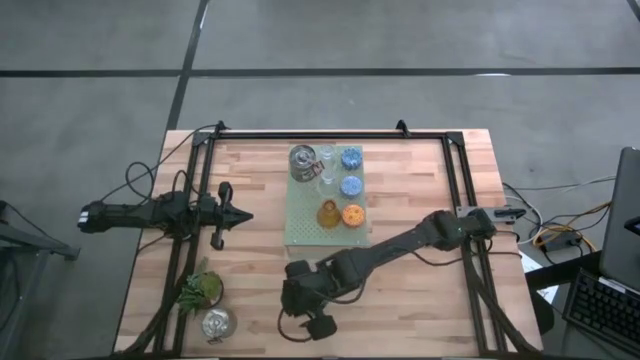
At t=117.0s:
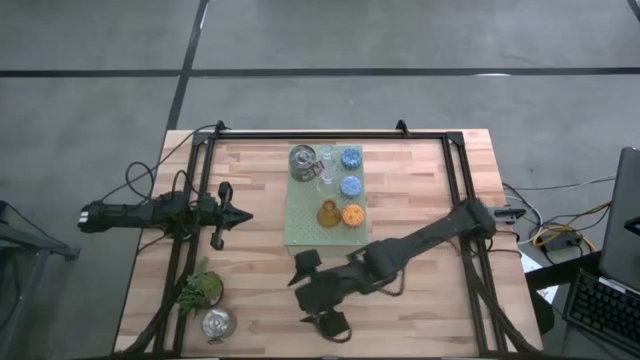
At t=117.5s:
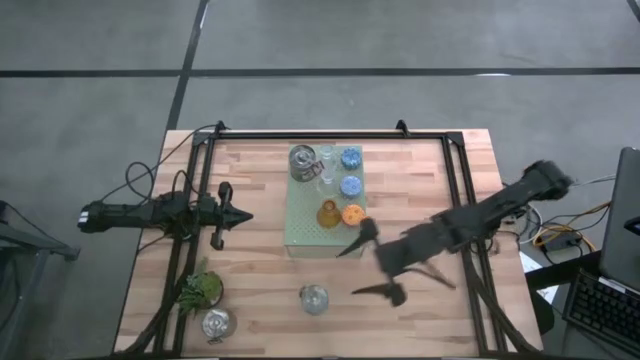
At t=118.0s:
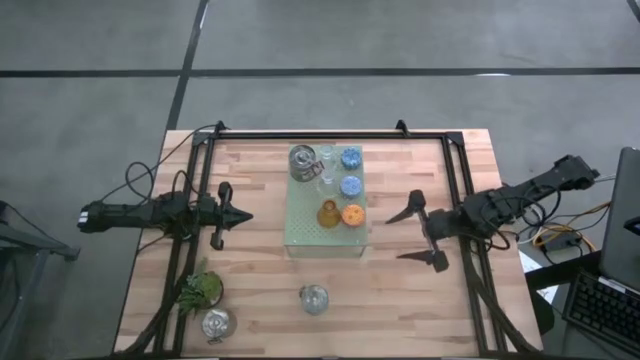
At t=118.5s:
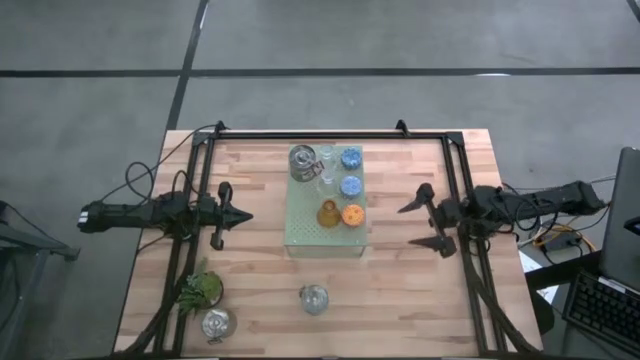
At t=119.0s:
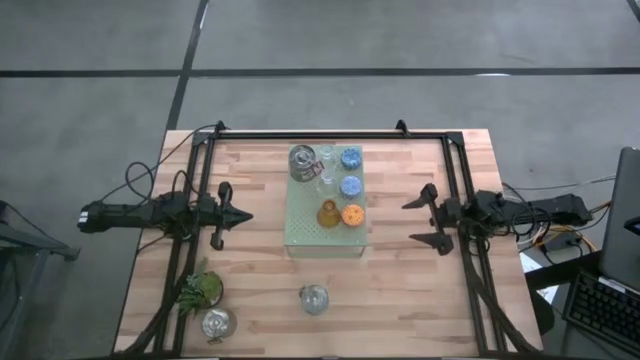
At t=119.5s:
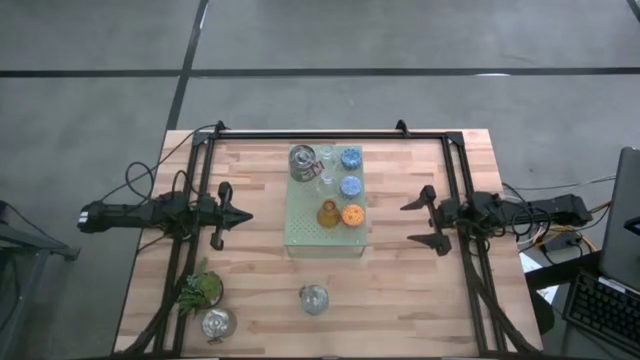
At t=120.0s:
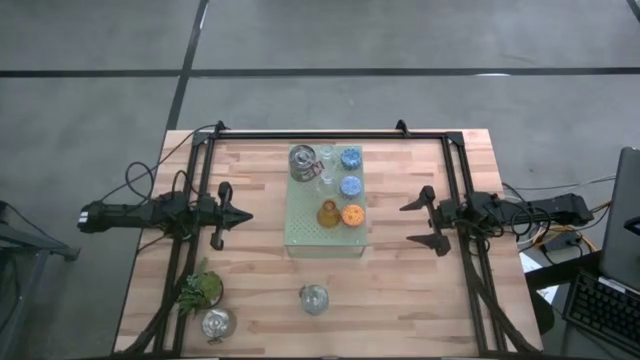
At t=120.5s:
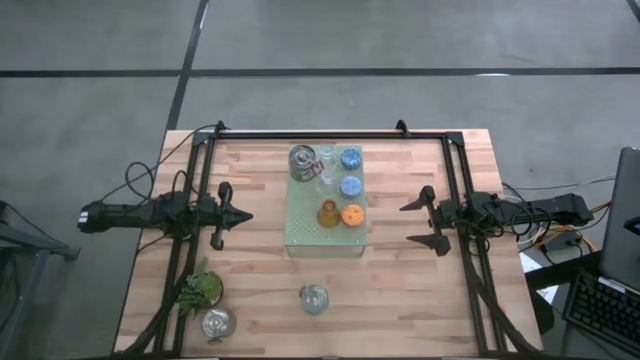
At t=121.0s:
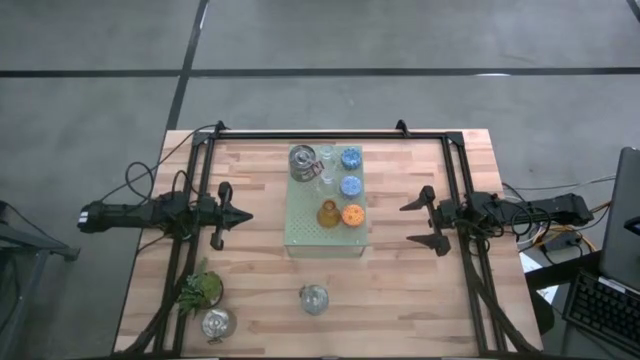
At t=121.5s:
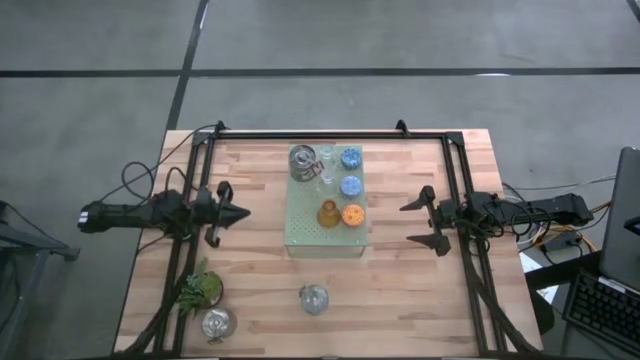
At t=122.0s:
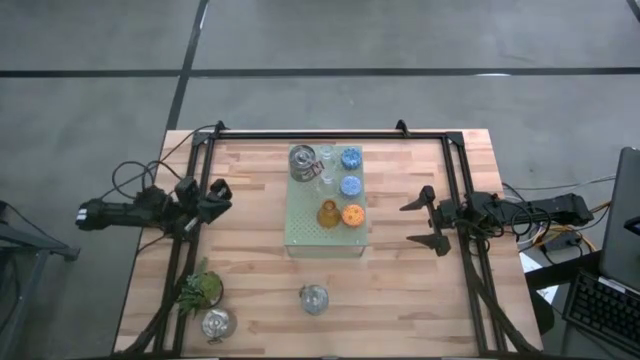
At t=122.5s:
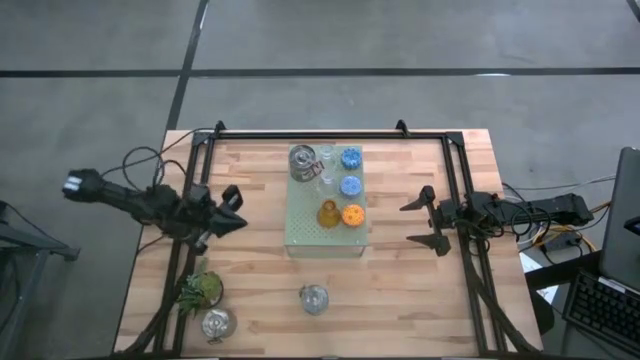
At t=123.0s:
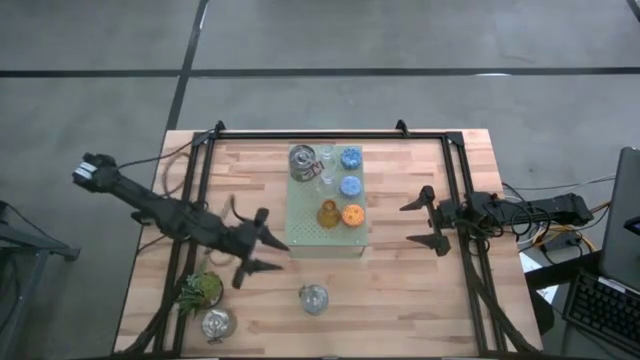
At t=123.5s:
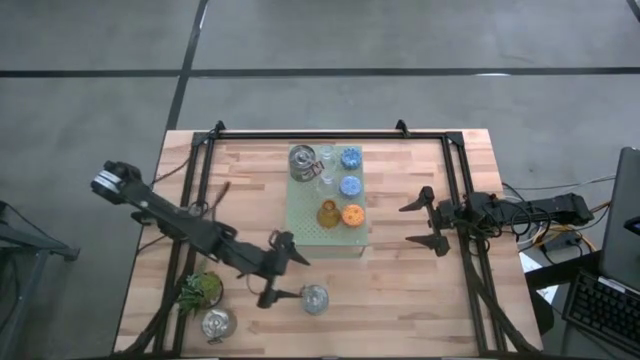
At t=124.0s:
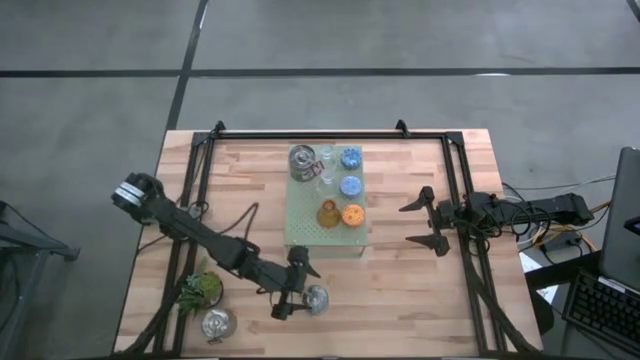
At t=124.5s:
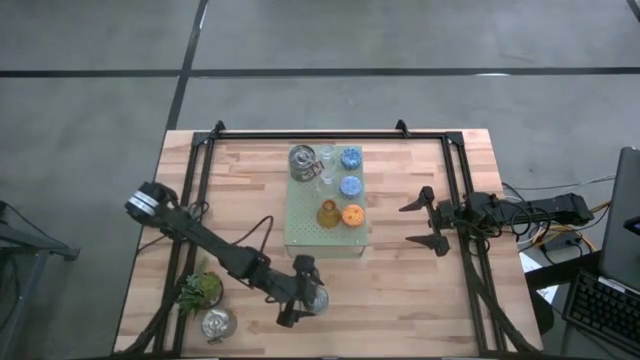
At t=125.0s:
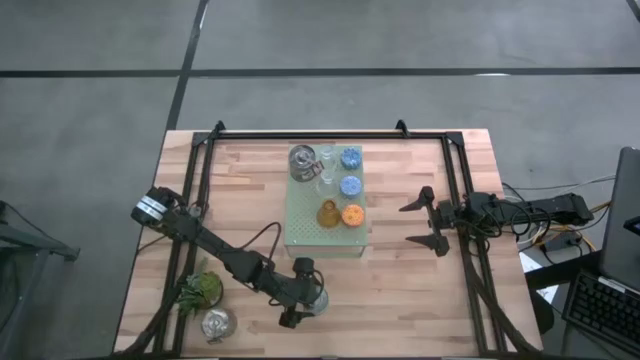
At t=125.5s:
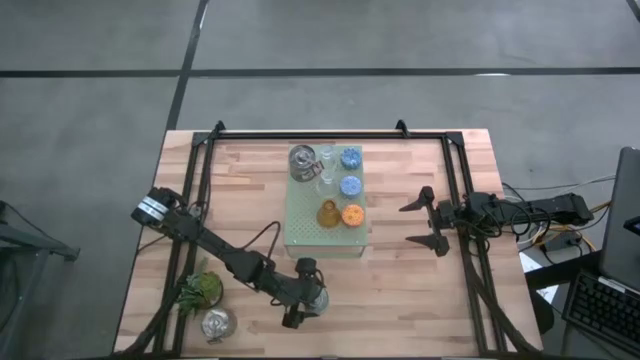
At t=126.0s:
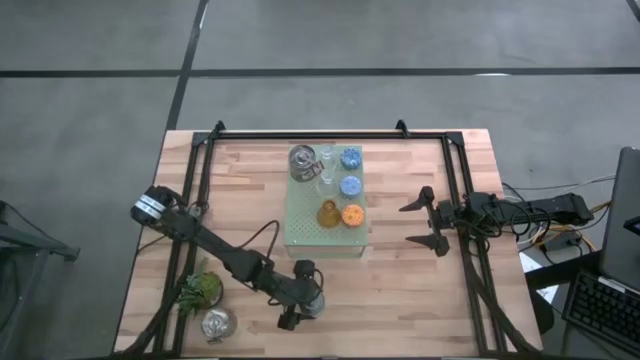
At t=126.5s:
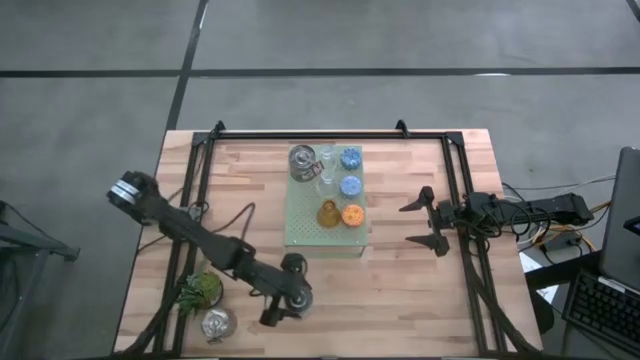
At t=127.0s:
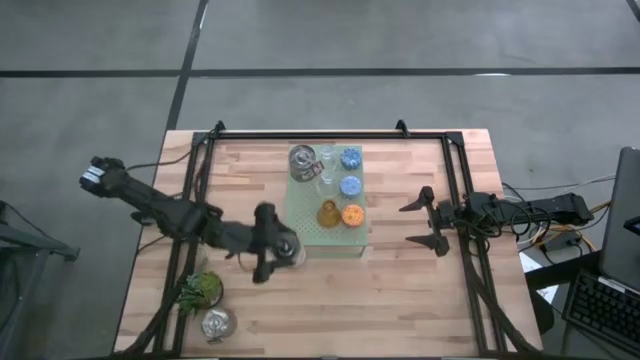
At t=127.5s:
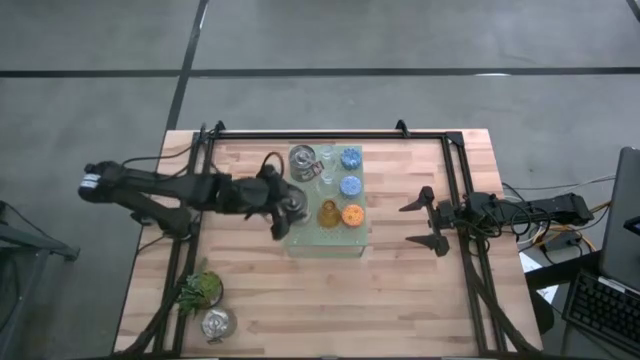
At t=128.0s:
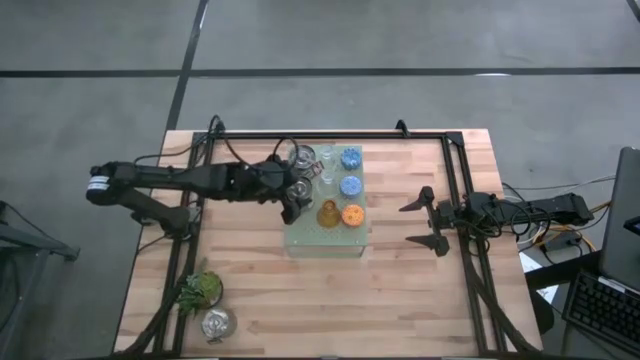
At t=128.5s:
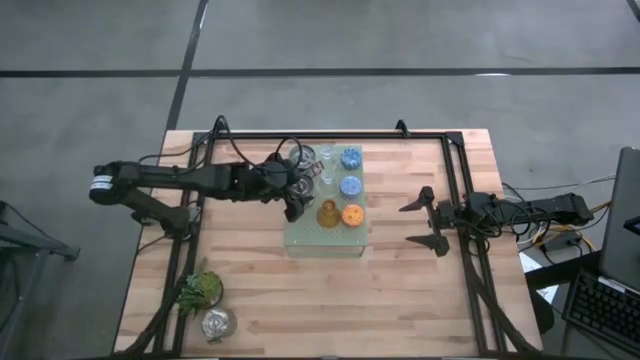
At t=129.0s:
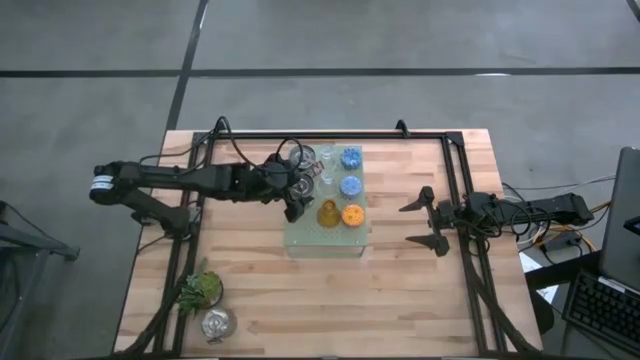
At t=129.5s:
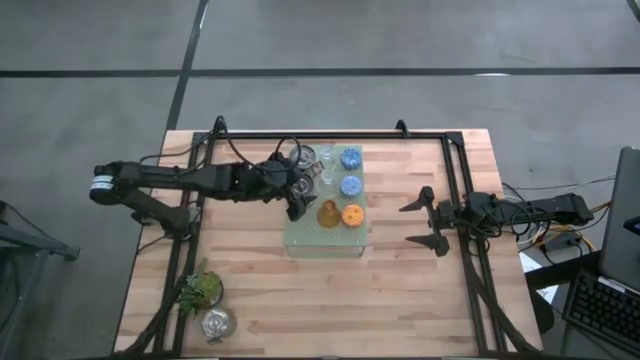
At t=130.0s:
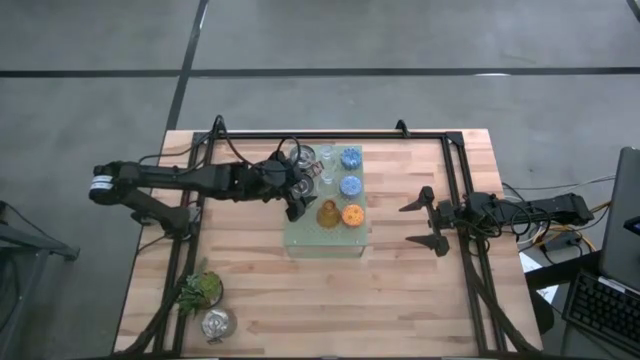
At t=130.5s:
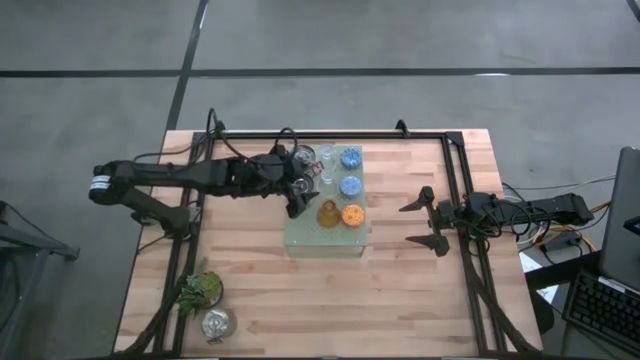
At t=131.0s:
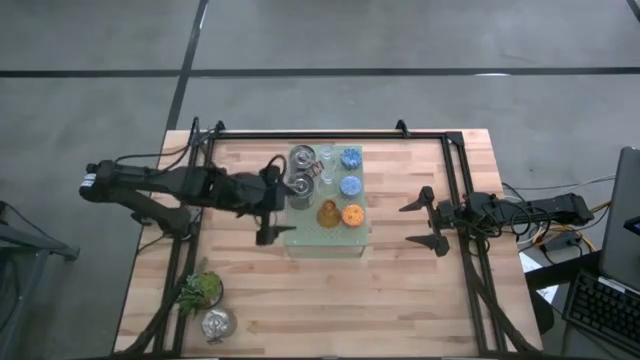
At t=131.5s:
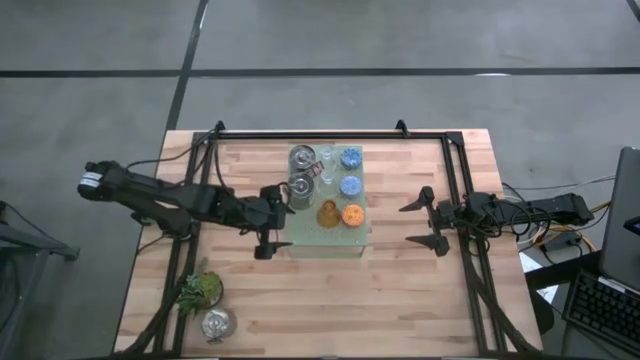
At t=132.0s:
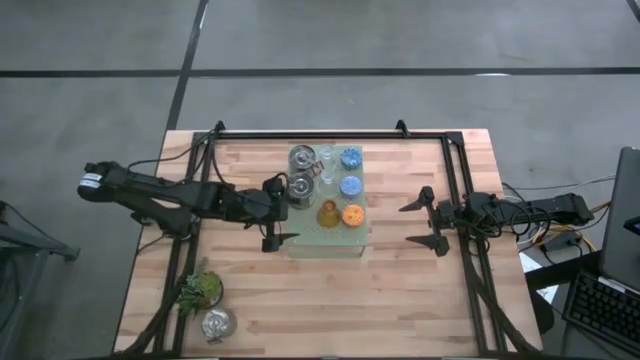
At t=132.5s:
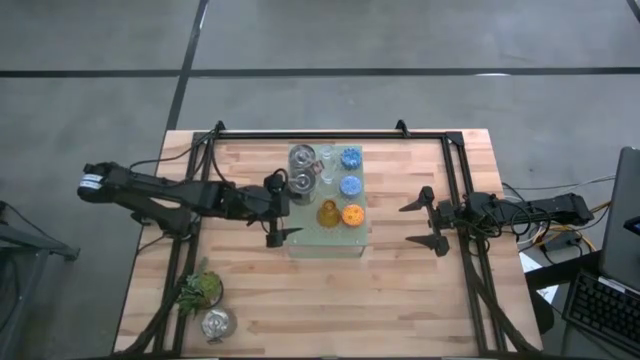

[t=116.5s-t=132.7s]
Task: Pick & Place candle stick holders
Put the green scented candle on the shelf aligned with the other brown scented candle

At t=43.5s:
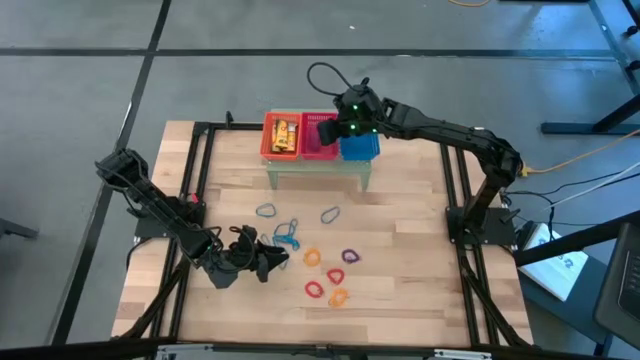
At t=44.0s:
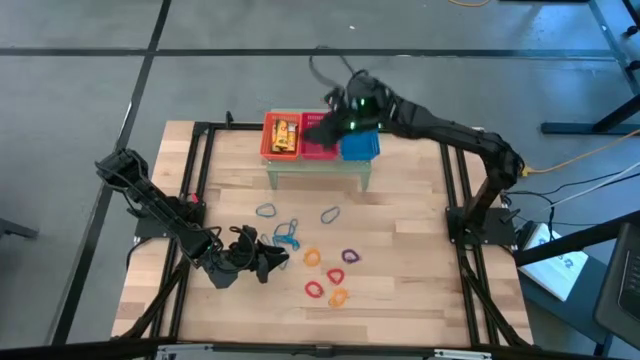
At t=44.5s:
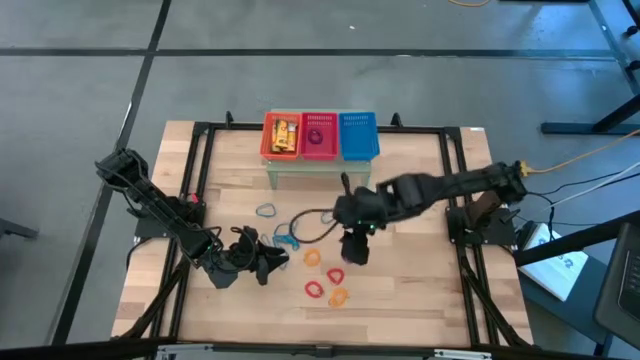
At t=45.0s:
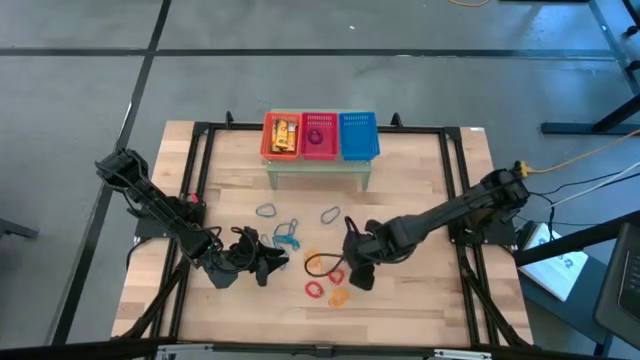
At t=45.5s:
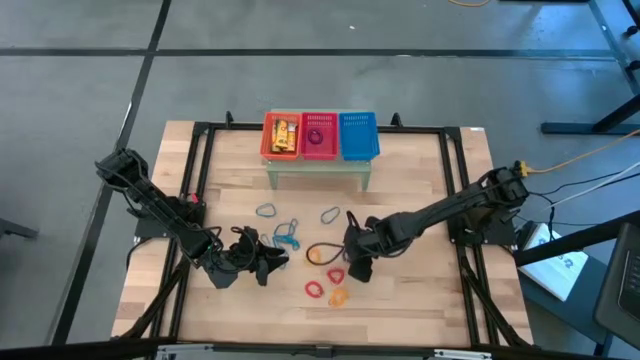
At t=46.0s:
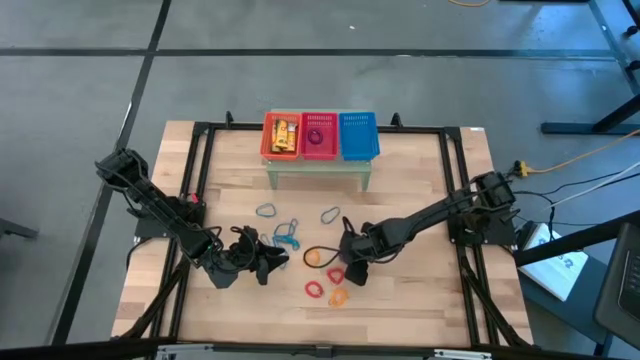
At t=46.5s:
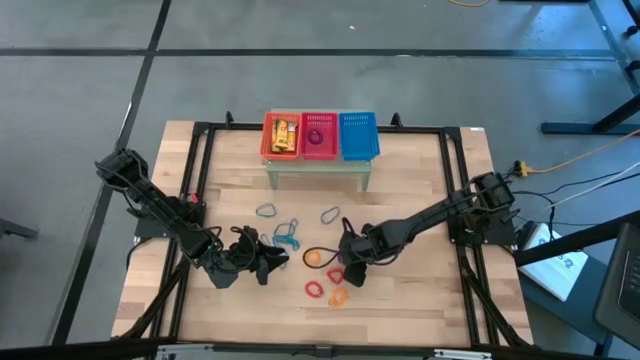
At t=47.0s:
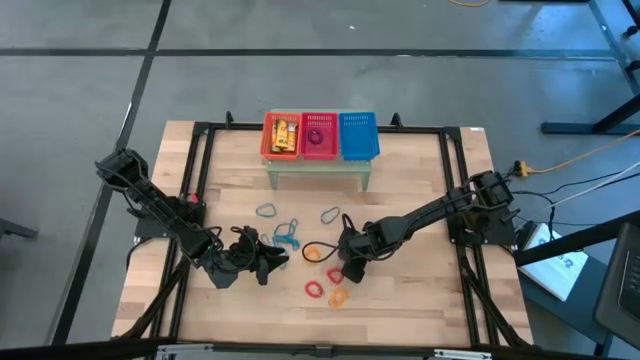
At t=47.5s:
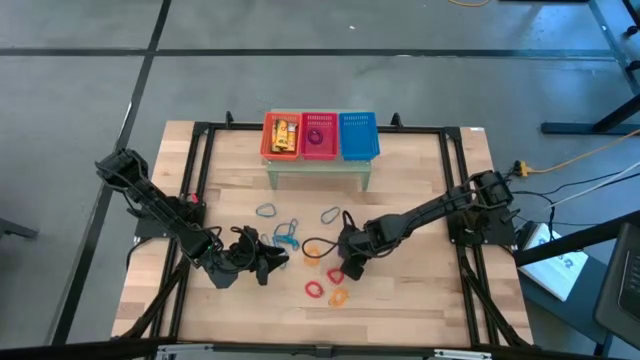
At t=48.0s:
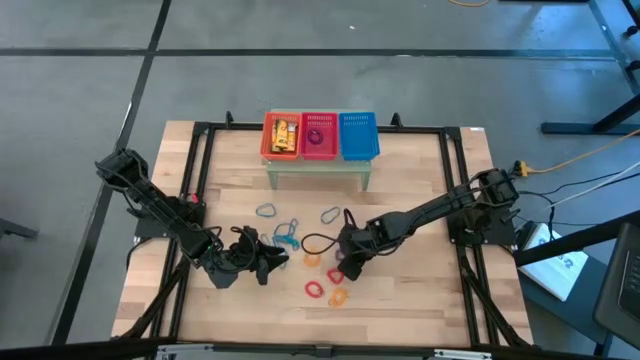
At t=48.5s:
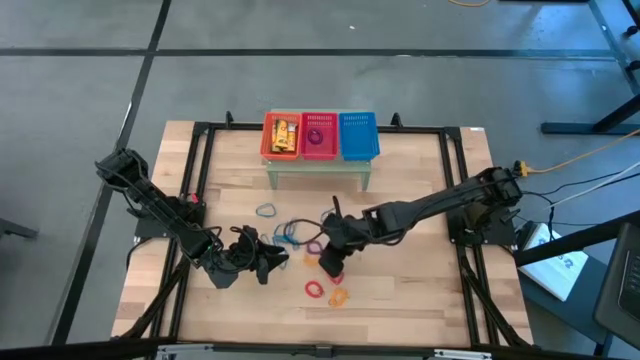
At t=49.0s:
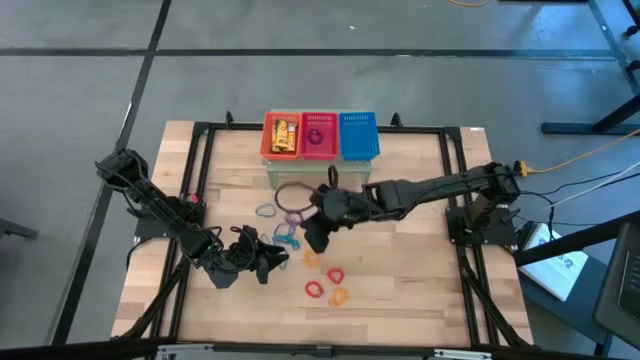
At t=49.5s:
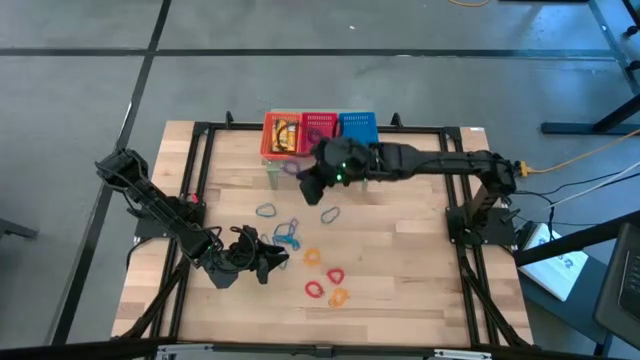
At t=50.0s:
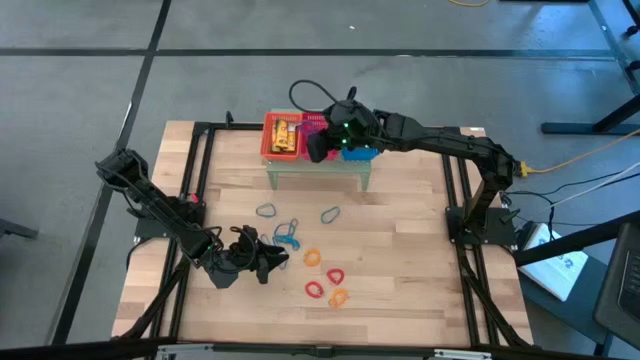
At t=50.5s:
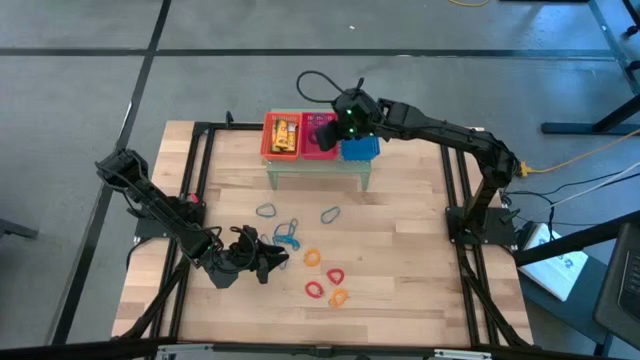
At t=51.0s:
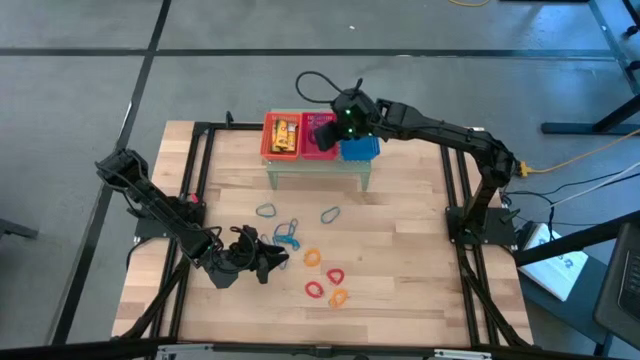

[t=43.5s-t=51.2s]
Task: Pick & Place Office Desk Supplies
Put the violet spring keychain into the red bin on the shelf
